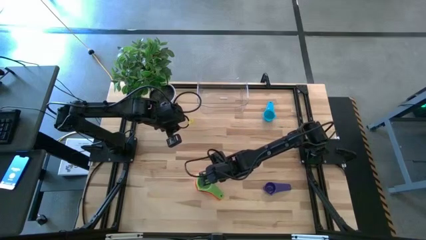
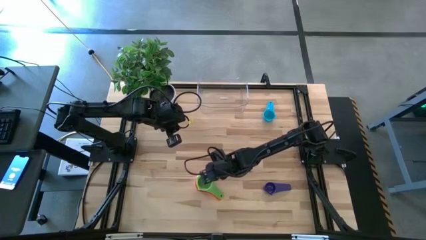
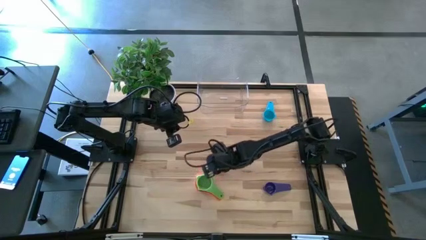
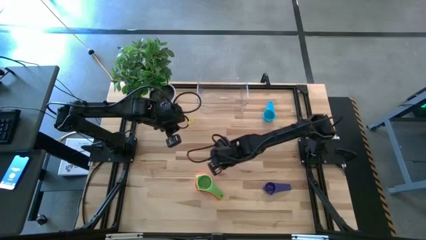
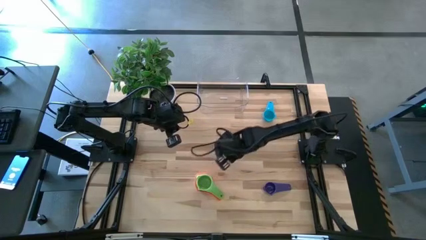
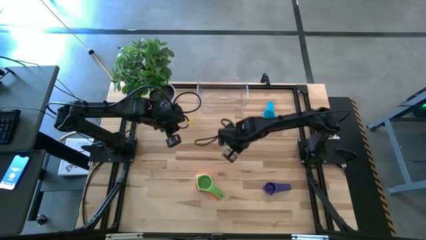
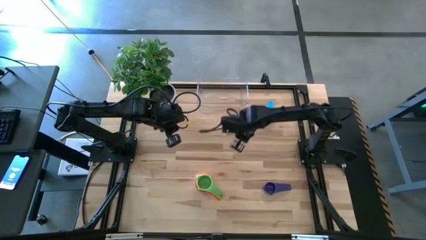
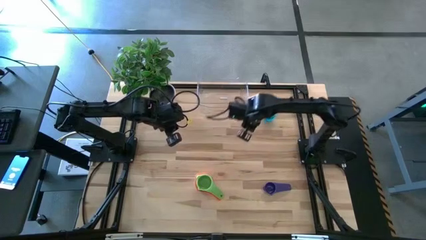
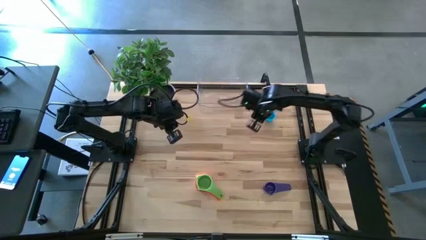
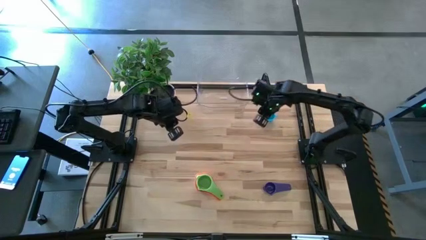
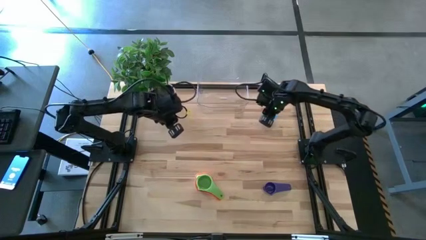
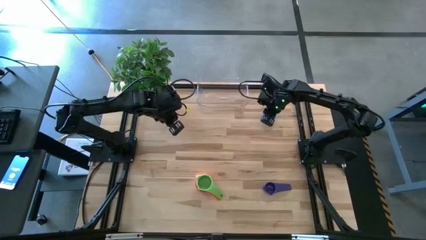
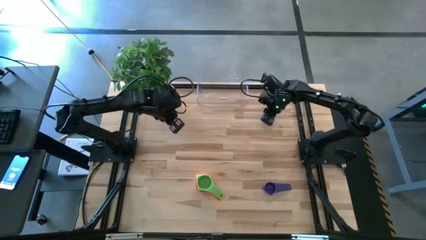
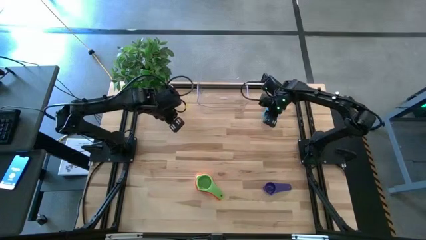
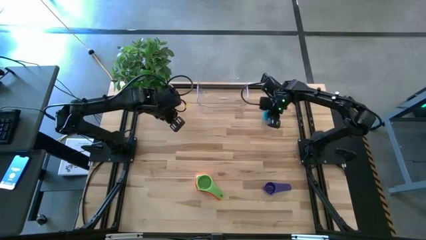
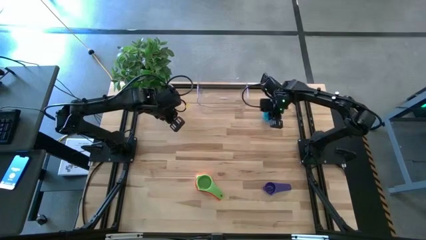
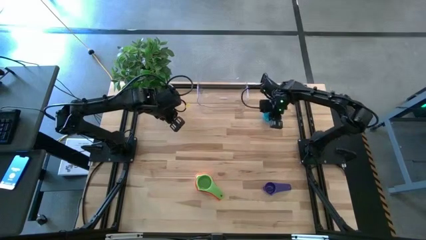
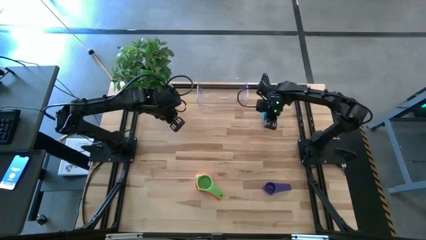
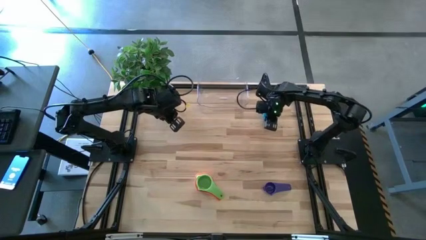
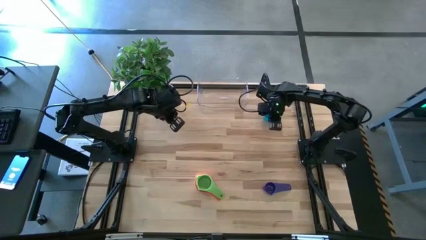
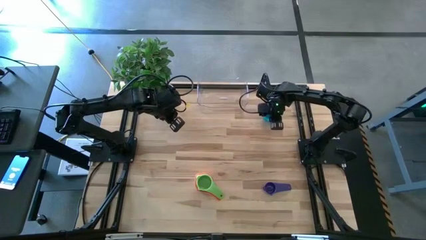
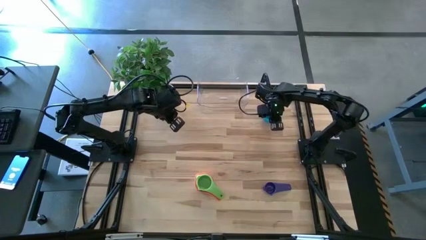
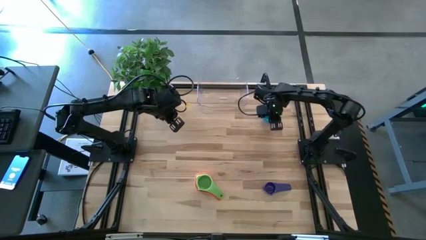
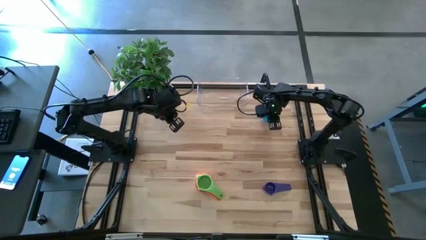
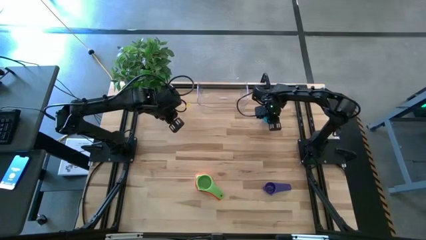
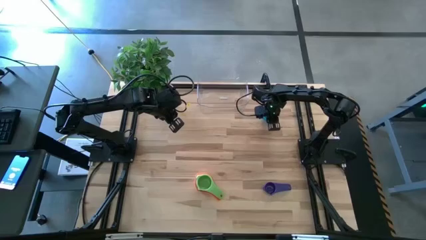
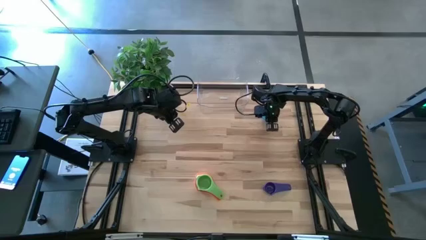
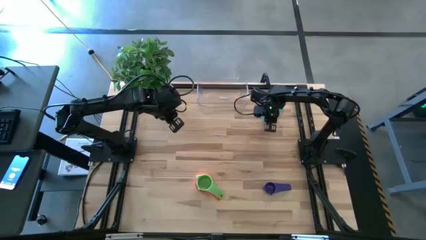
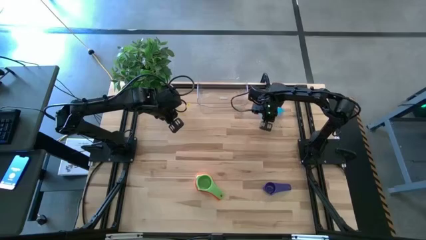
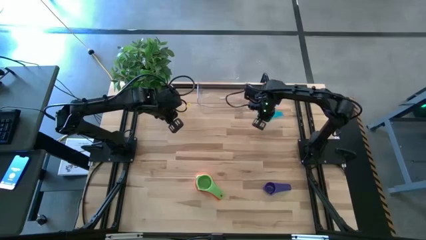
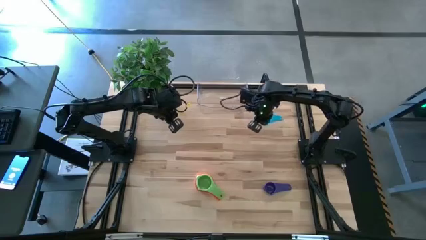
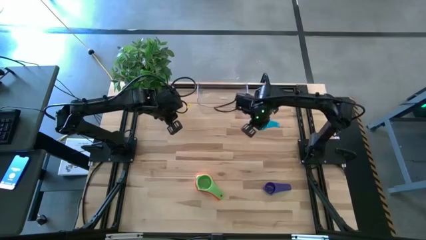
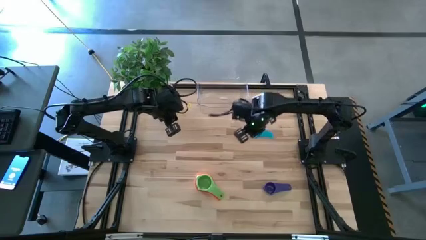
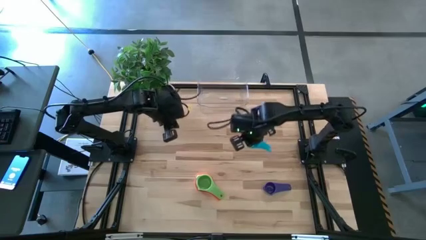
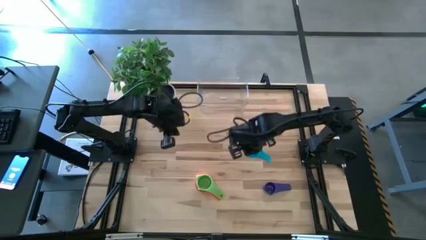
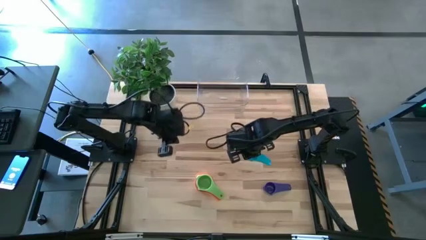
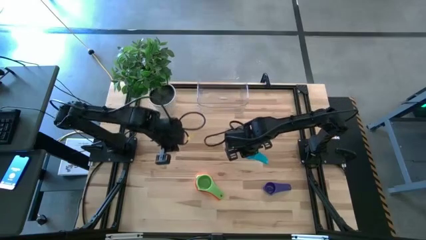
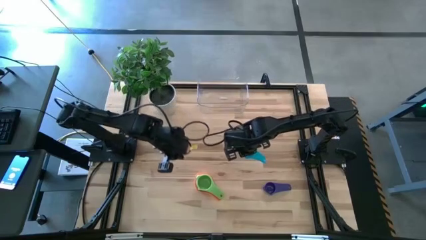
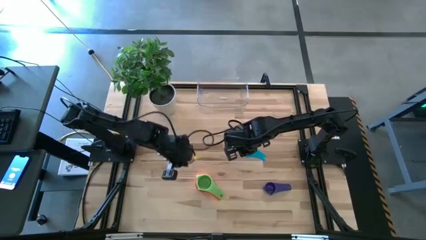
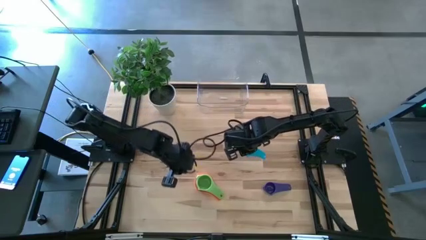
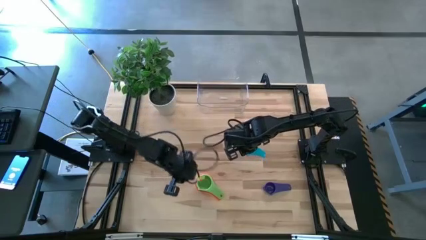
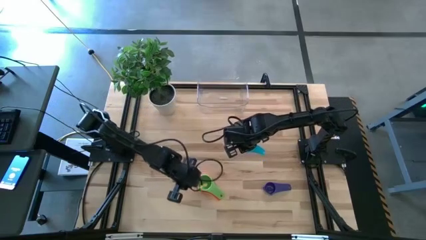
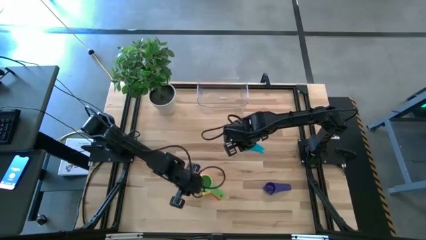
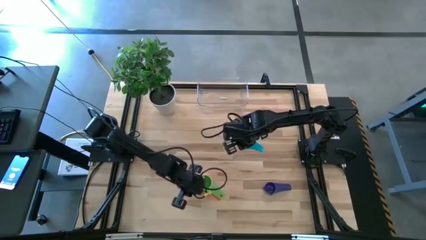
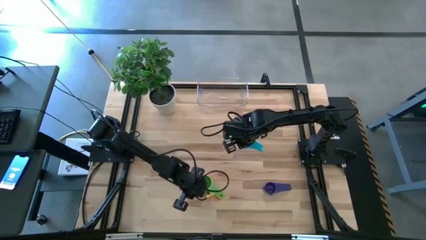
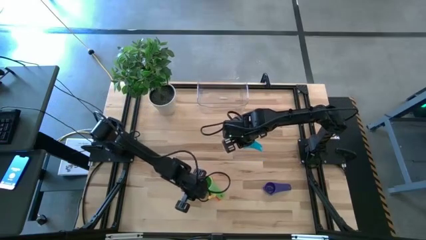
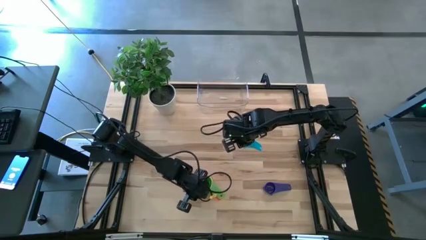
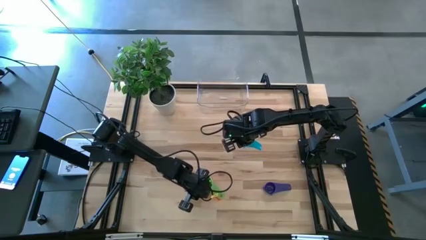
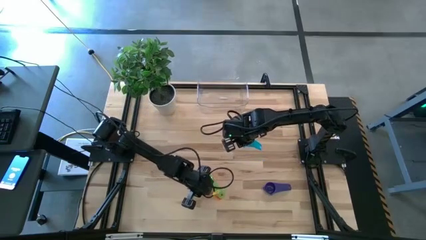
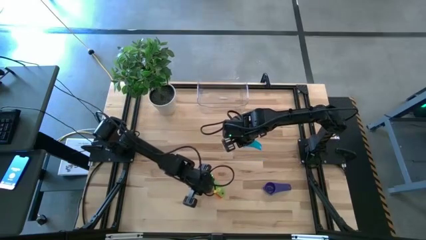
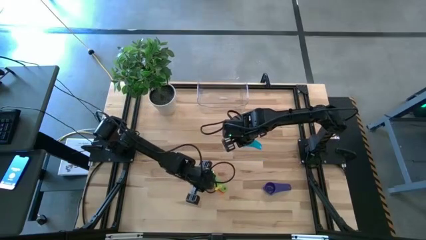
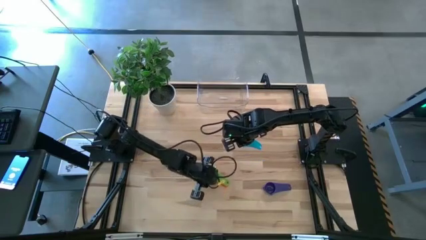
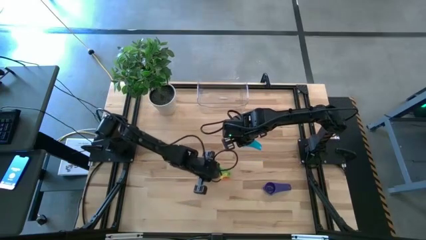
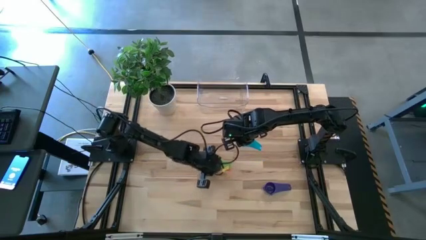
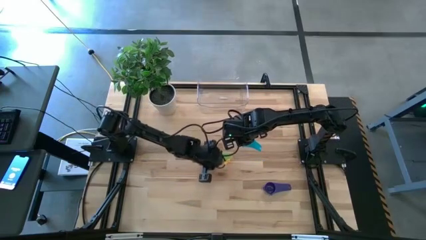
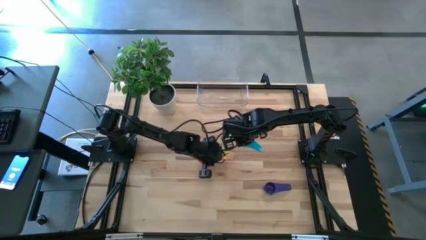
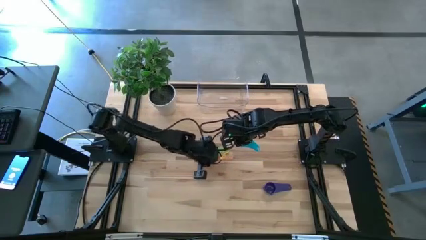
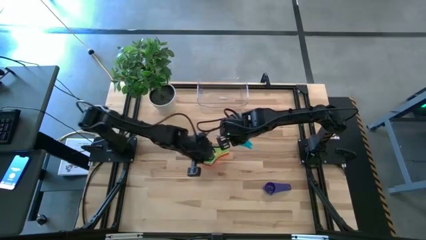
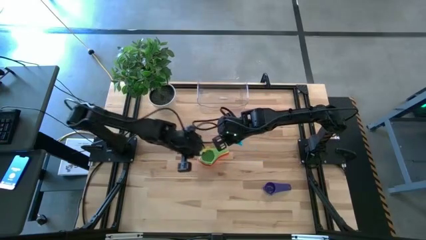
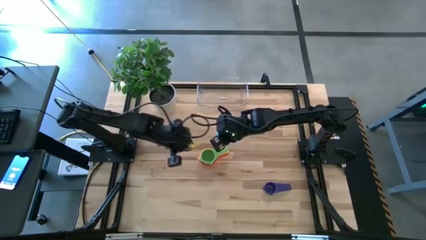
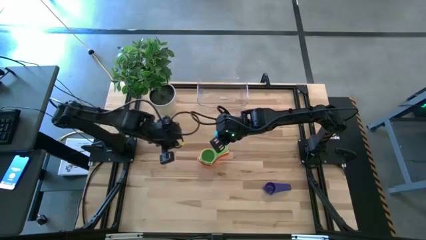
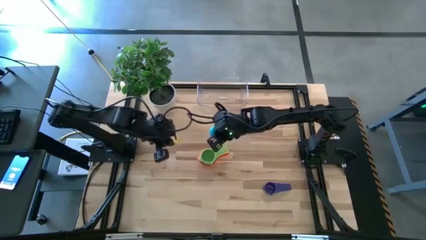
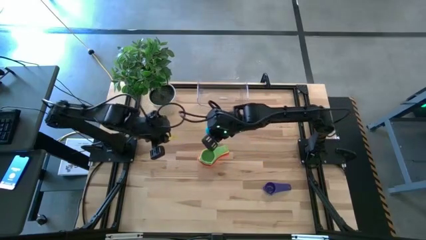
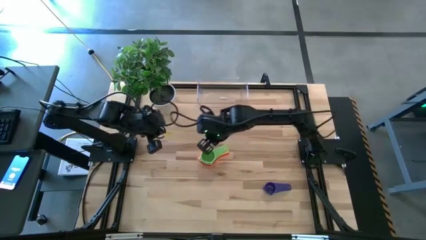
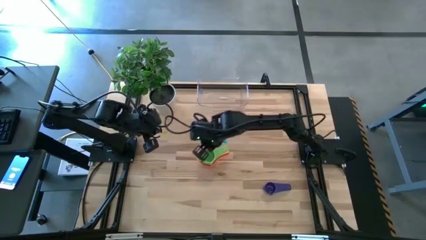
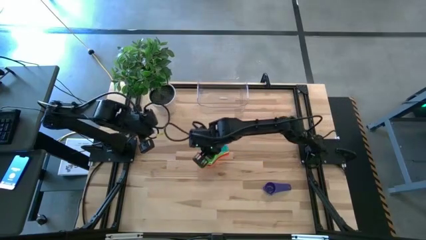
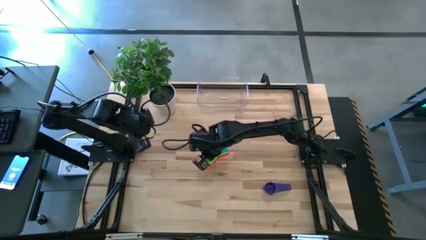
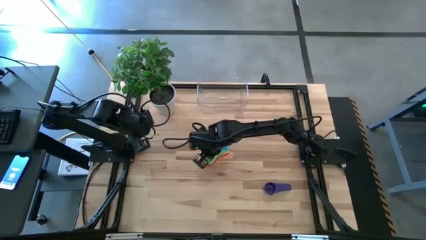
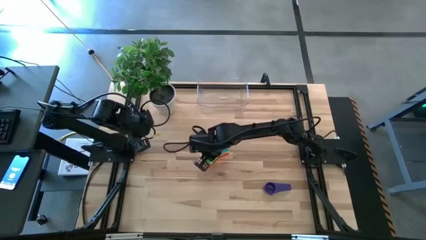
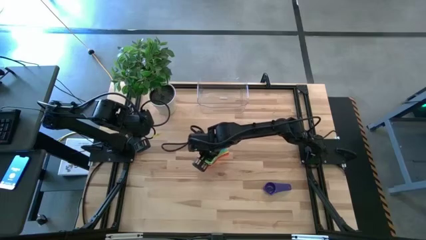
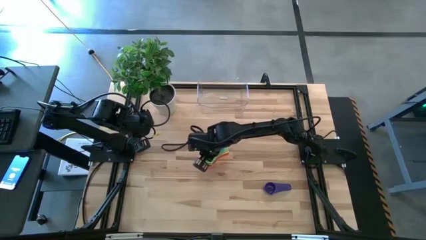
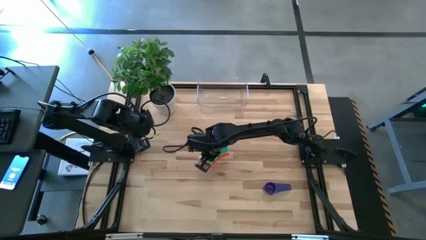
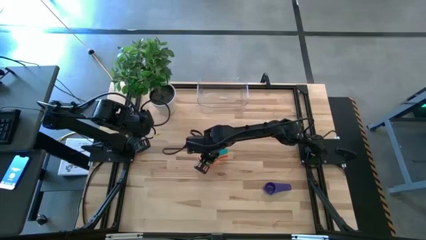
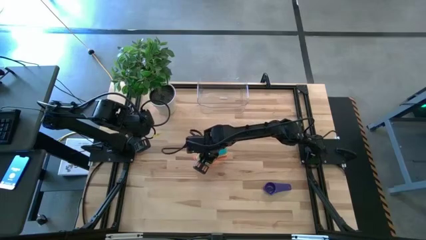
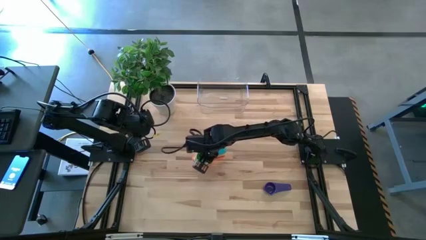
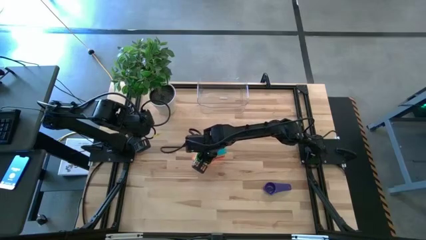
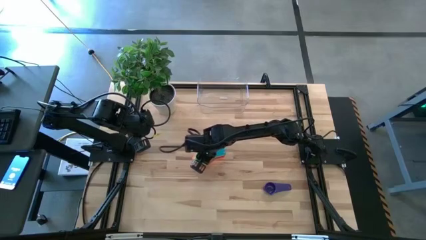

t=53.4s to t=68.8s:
Task: Nest measuring cups in basket
Stack the light blue measuring cup on top of the green measuring cup
